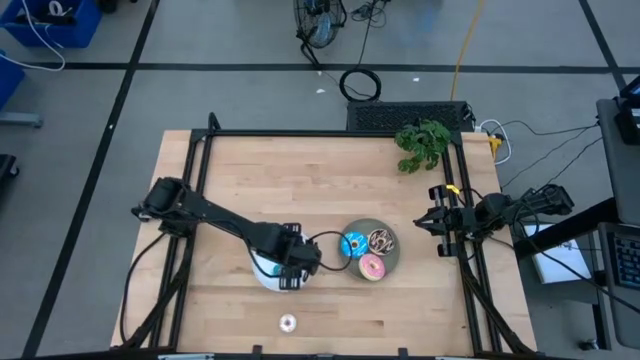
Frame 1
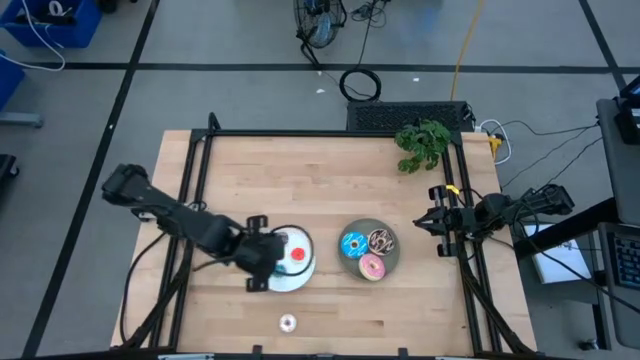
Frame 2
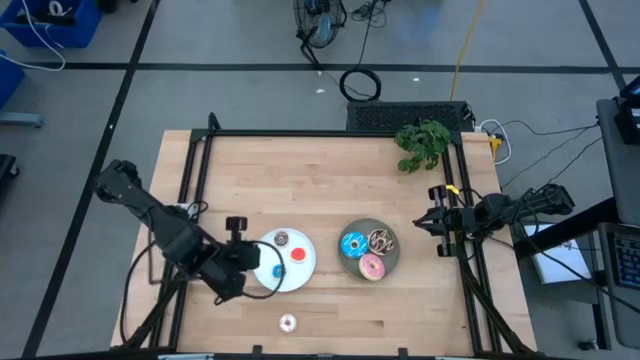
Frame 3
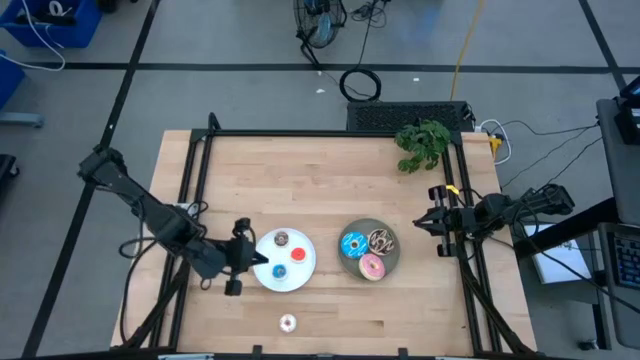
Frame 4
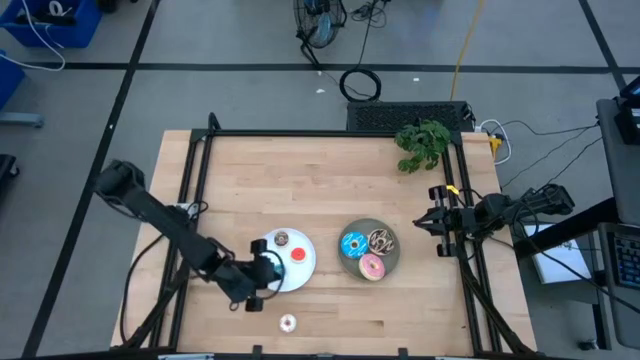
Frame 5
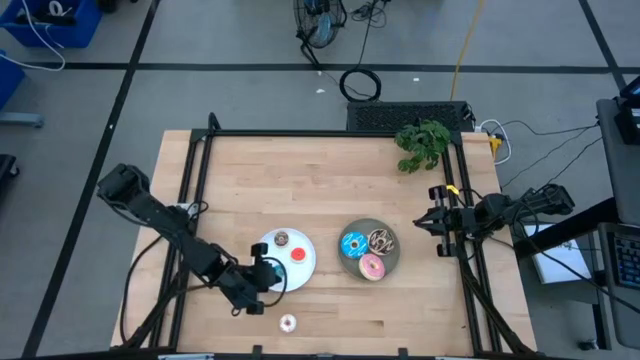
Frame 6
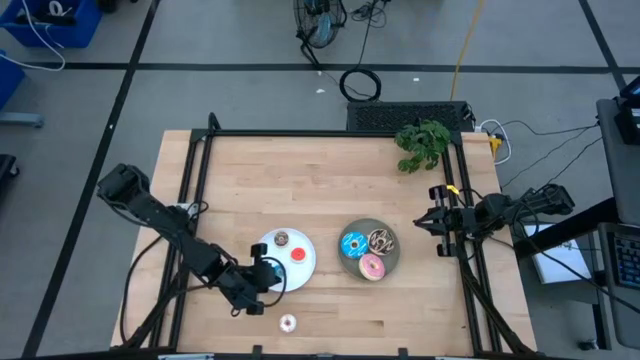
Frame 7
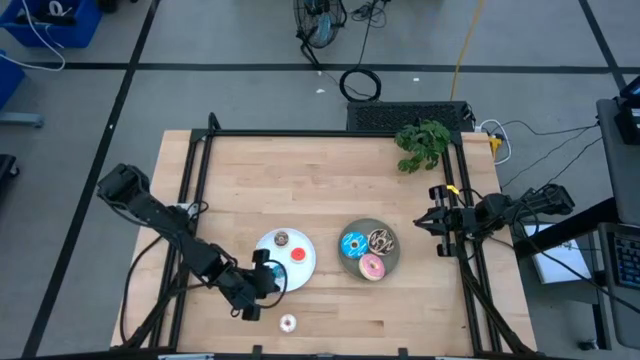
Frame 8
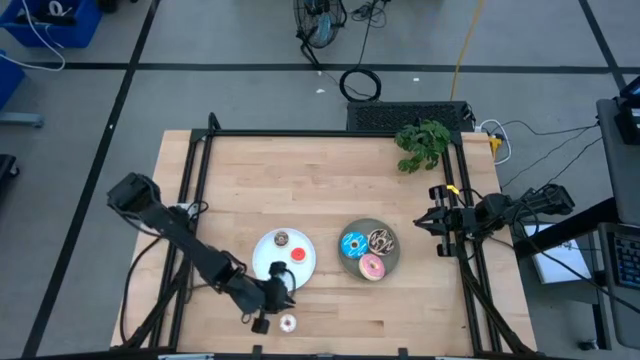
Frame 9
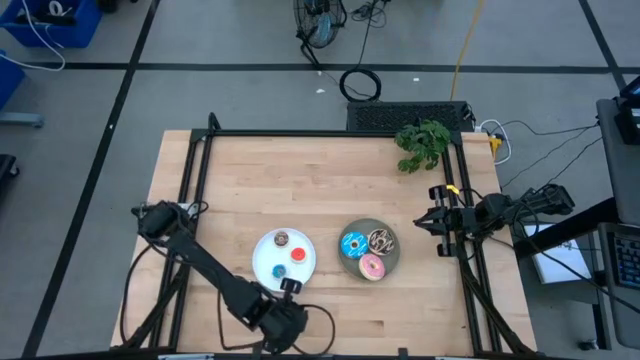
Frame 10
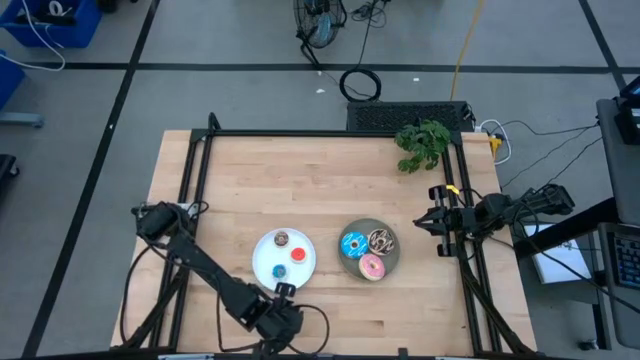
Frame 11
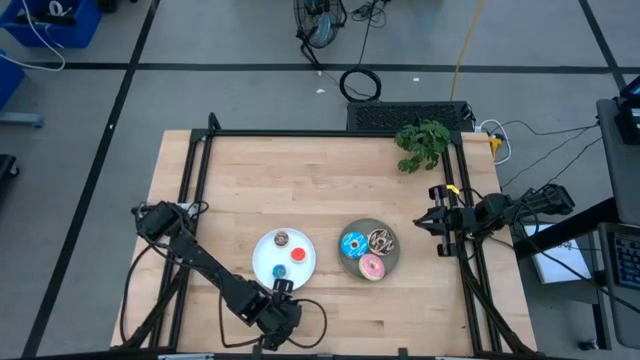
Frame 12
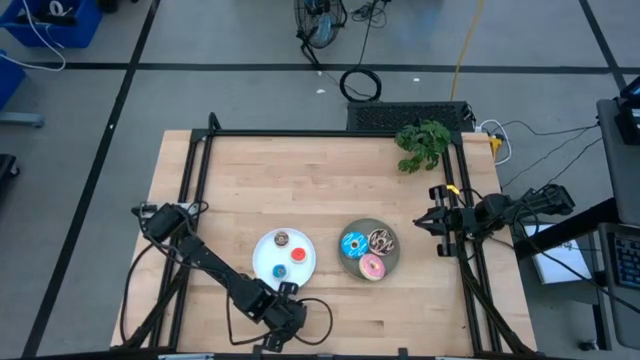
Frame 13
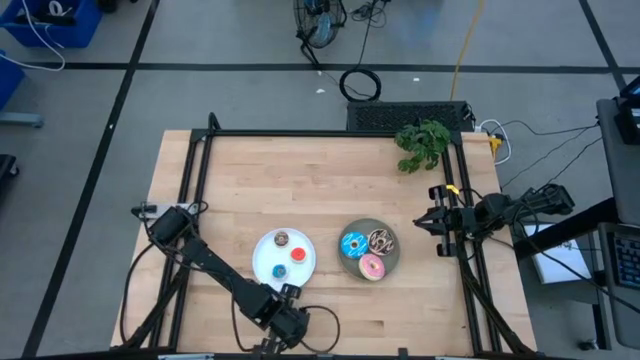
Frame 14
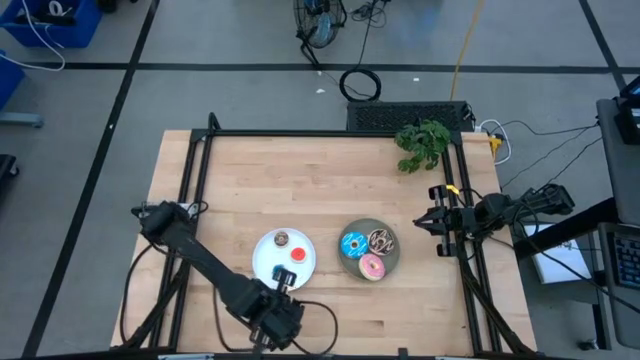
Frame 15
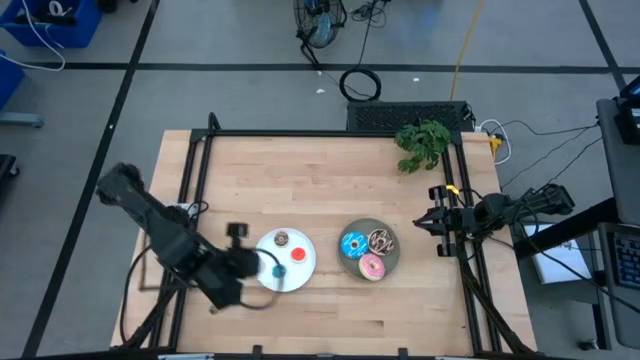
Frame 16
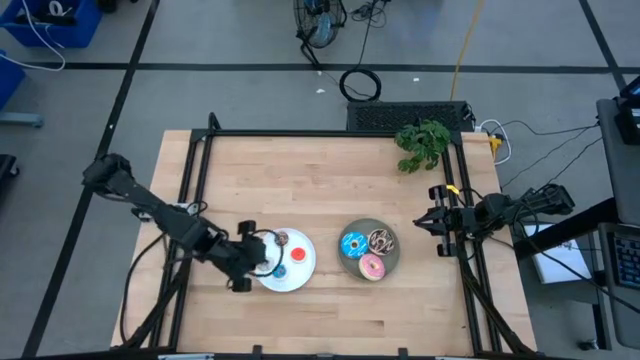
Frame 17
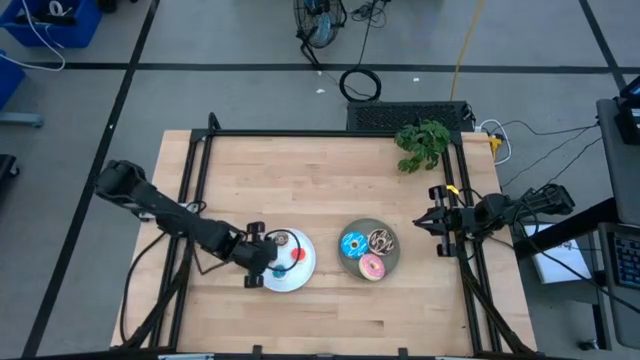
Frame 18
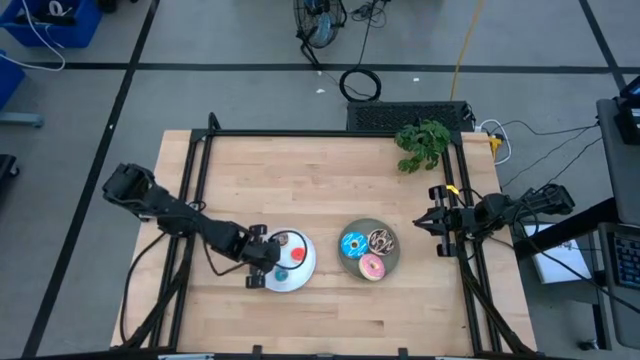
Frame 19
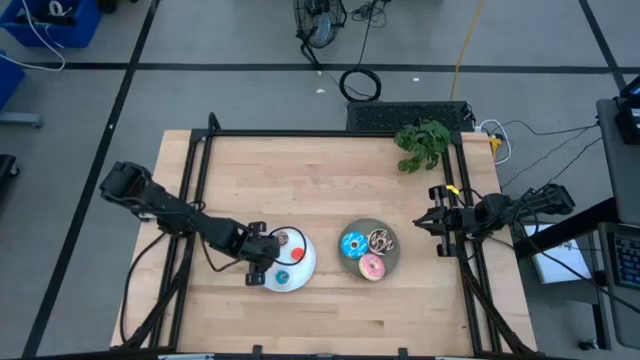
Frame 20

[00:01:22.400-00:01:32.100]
Task: Pick & Place donuts
Put the small white donut into the white plate

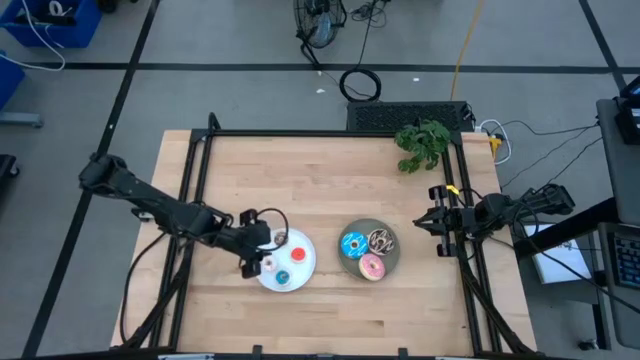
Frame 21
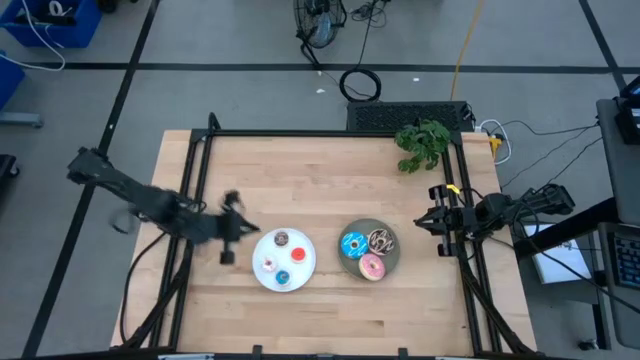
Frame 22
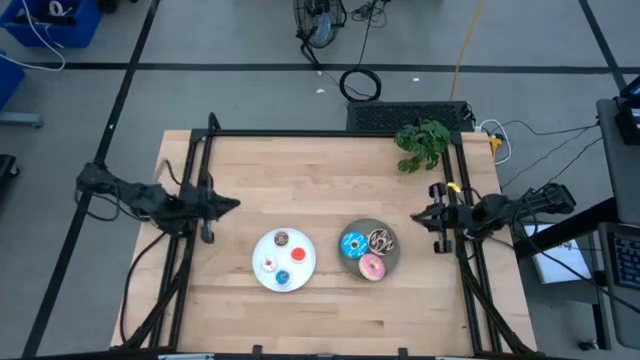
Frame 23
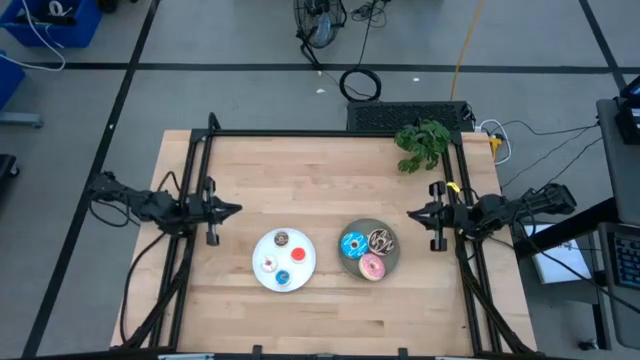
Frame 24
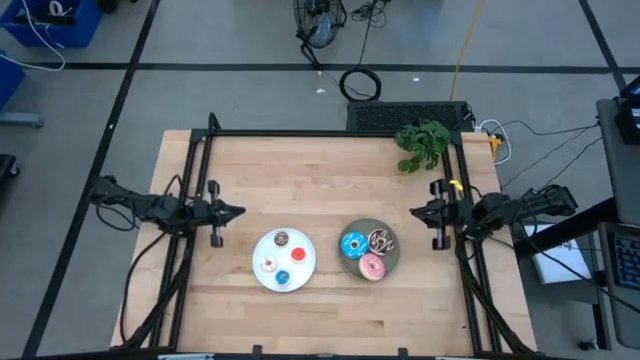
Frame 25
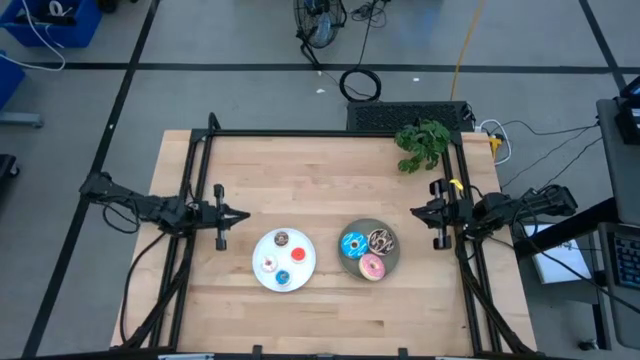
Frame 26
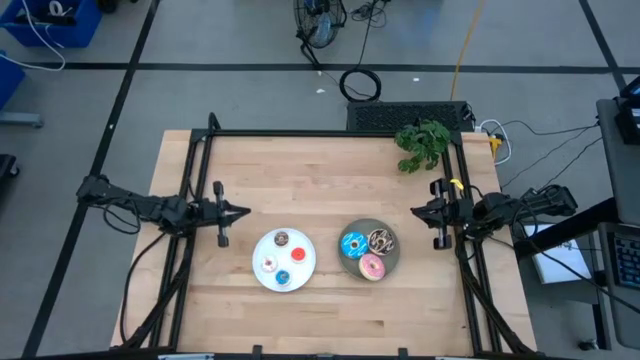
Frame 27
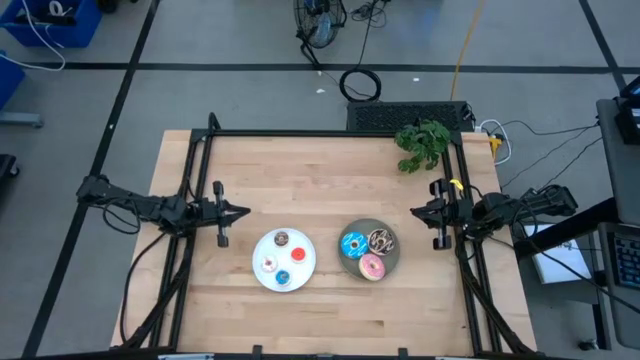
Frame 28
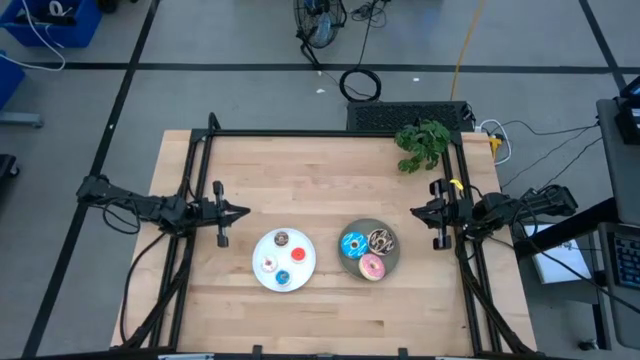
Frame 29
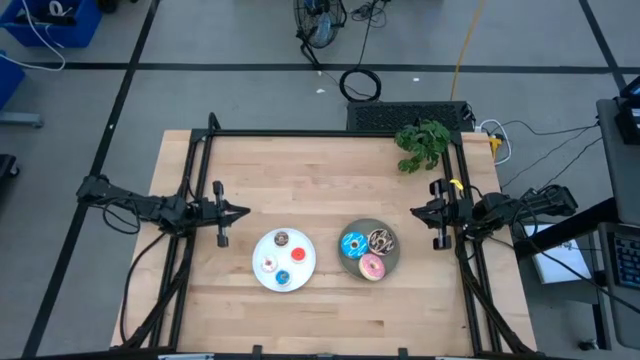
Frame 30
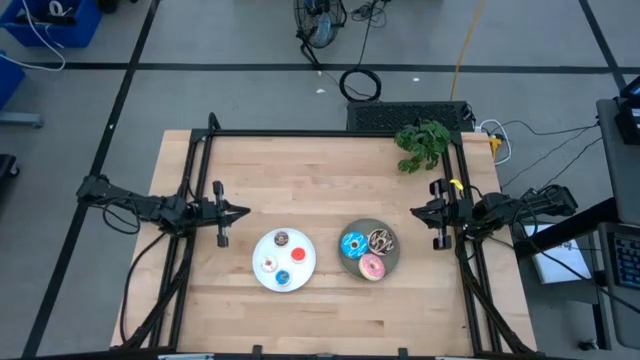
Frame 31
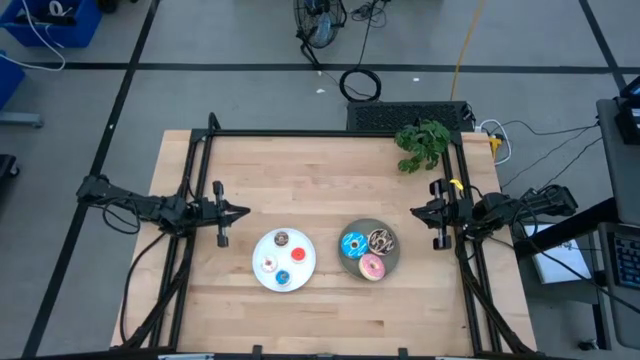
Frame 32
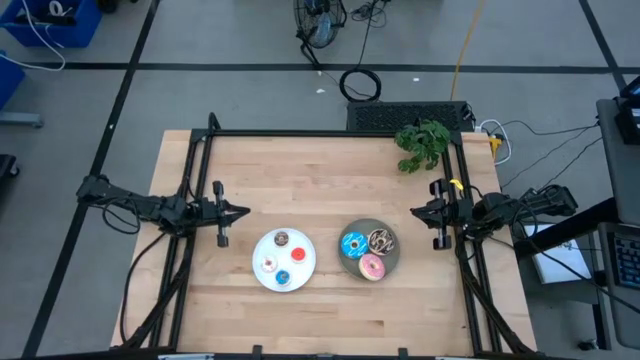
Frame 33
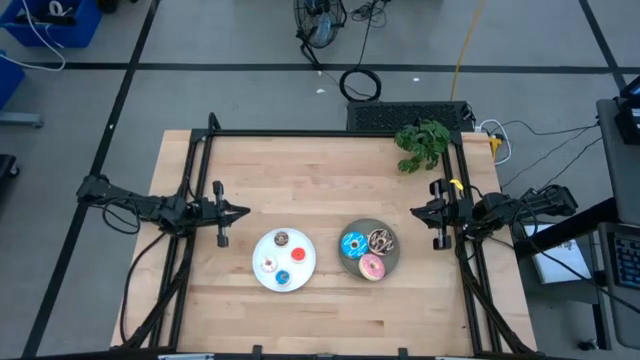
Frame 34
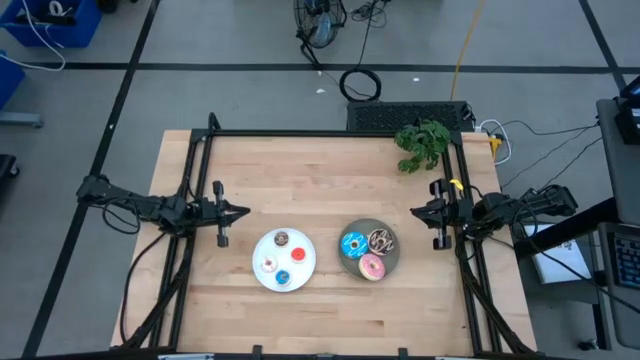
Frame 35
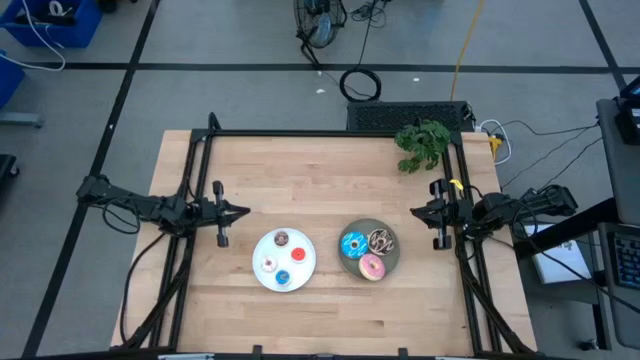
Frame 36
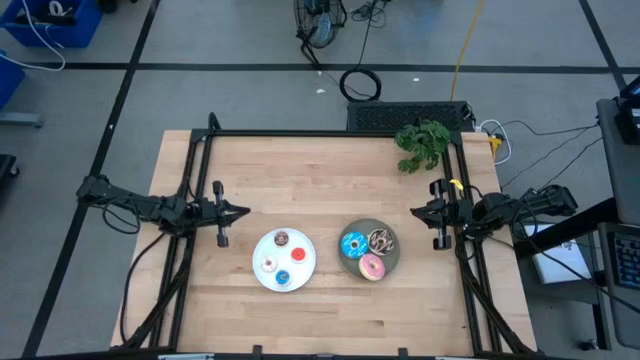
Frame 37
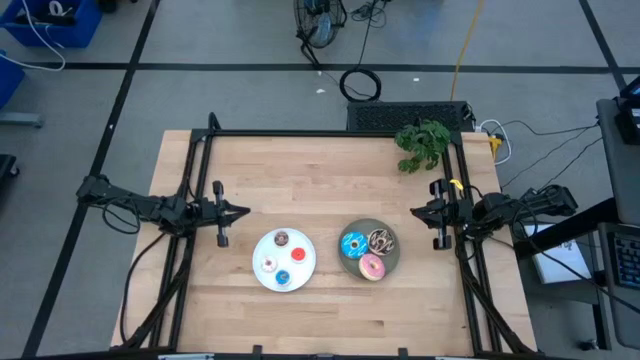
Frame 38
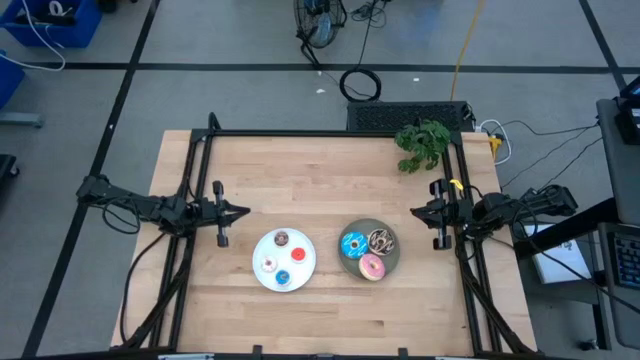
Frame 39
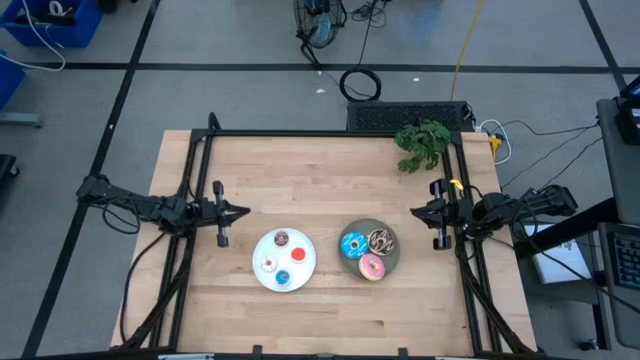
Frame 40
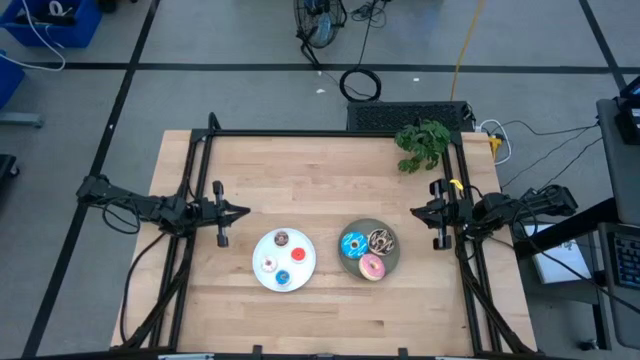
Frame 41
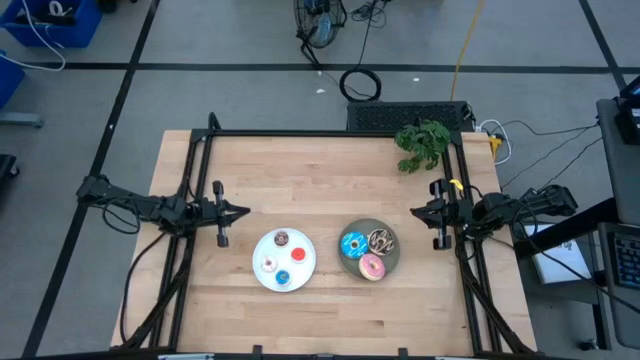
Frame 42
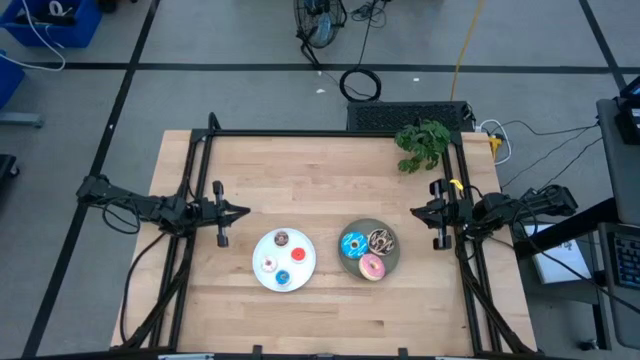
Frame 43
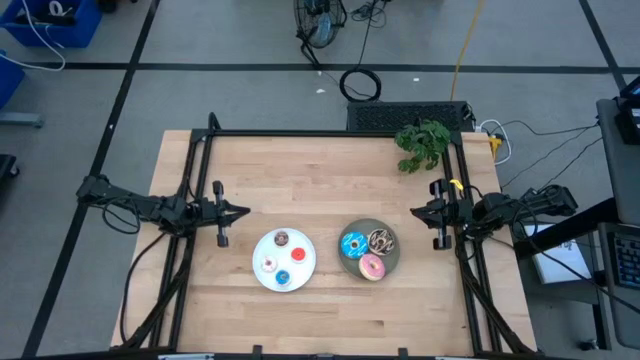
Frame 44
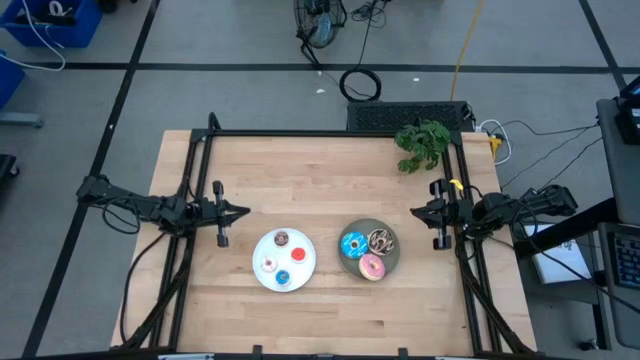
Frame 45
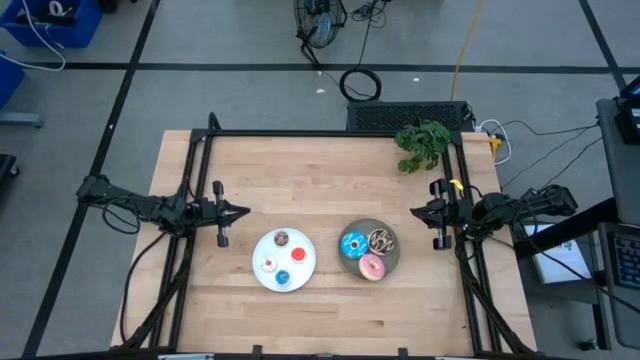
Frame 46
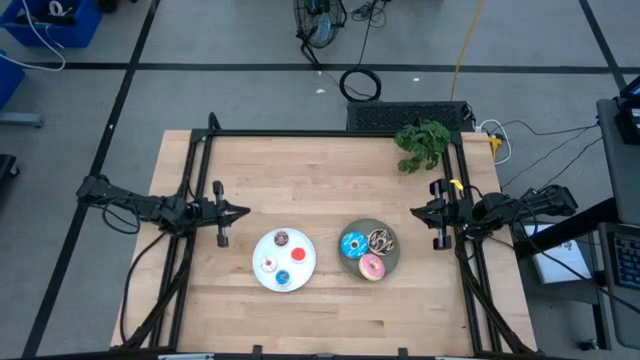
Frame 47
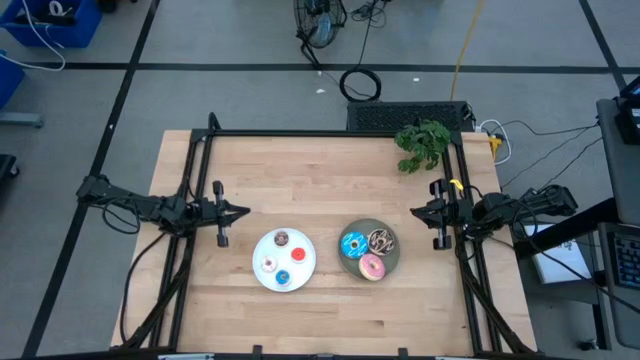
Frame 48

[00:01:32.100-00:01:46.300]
Return to Home Position
